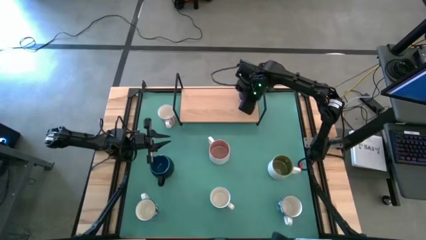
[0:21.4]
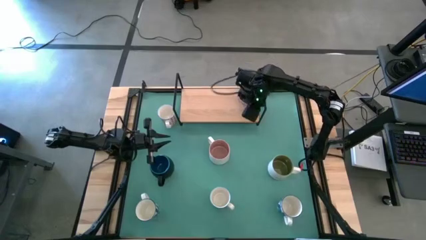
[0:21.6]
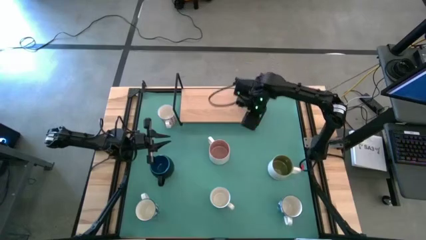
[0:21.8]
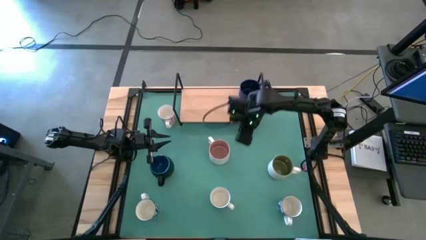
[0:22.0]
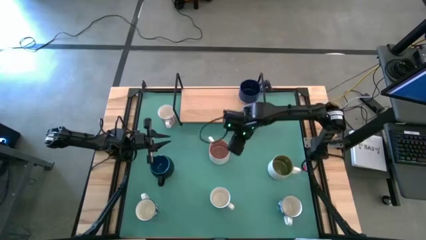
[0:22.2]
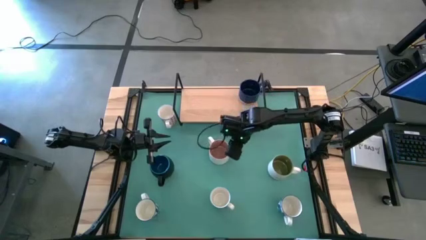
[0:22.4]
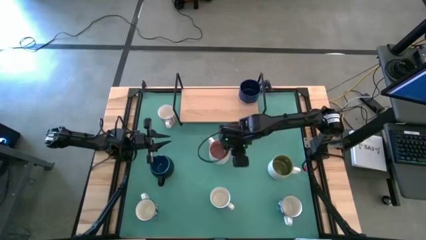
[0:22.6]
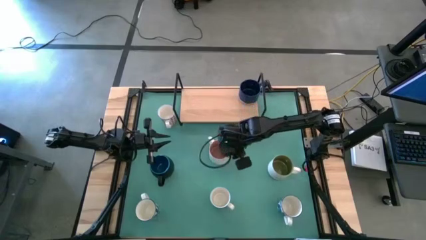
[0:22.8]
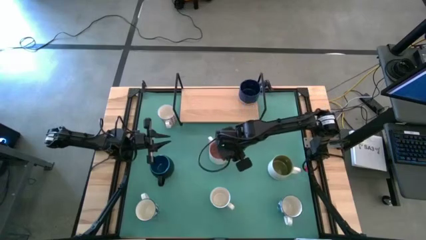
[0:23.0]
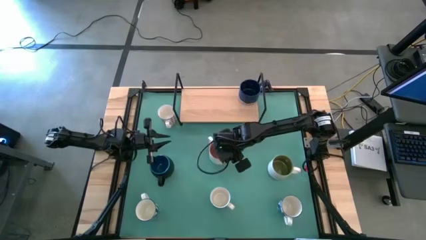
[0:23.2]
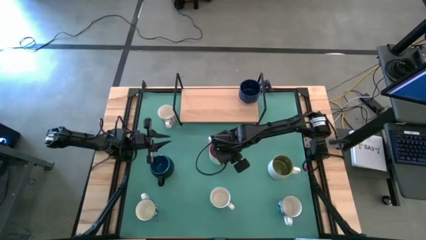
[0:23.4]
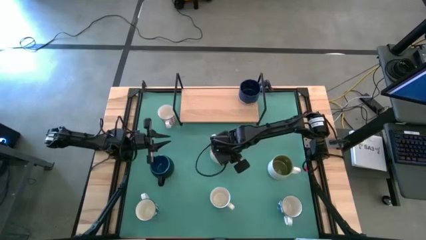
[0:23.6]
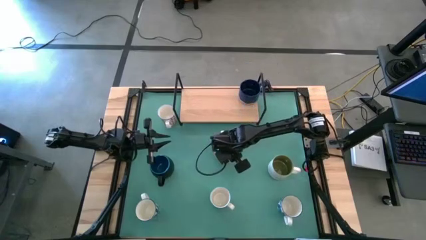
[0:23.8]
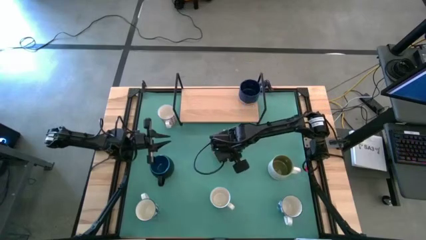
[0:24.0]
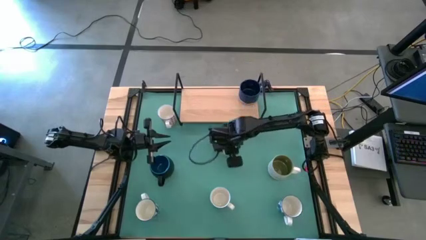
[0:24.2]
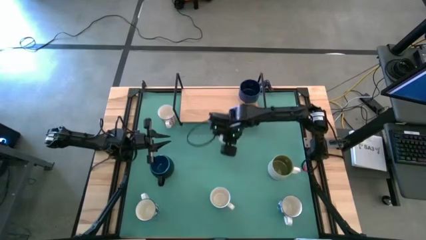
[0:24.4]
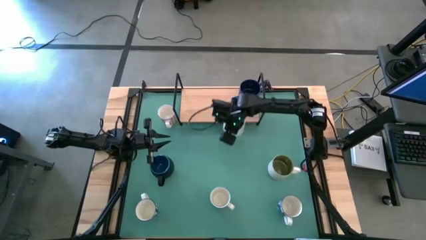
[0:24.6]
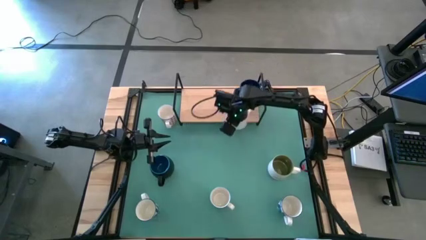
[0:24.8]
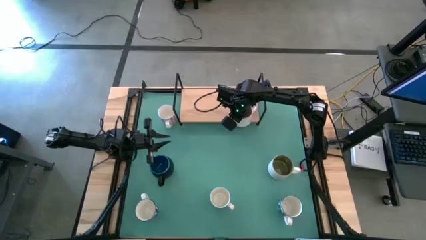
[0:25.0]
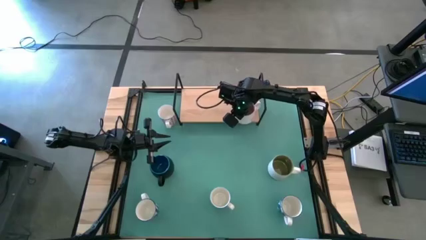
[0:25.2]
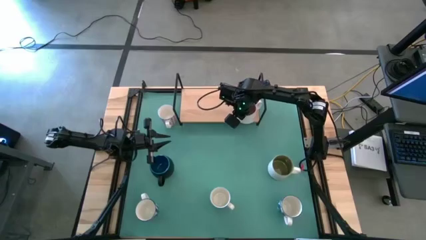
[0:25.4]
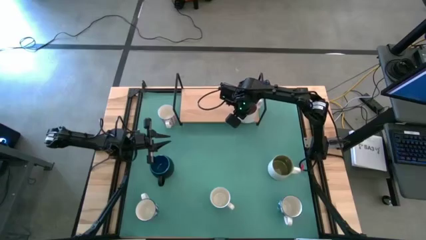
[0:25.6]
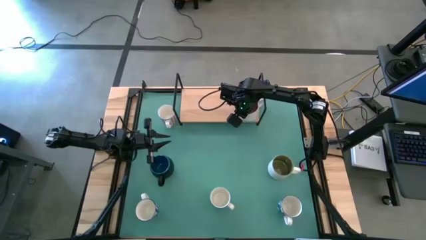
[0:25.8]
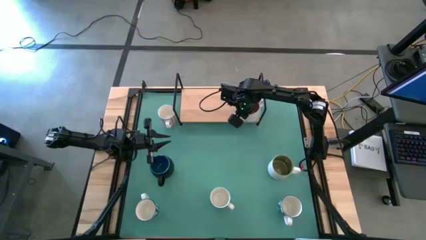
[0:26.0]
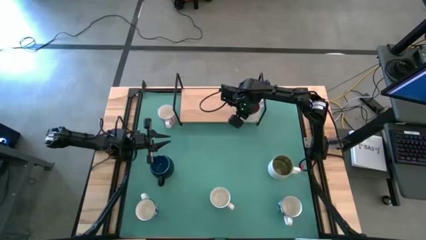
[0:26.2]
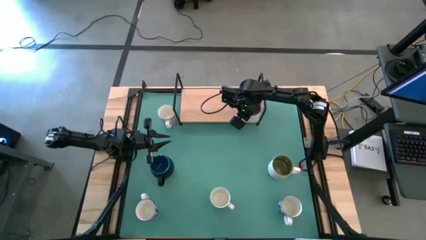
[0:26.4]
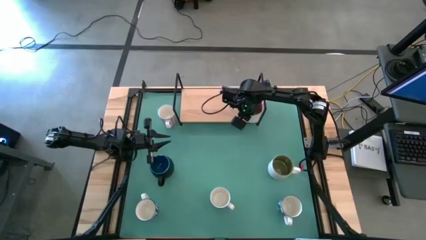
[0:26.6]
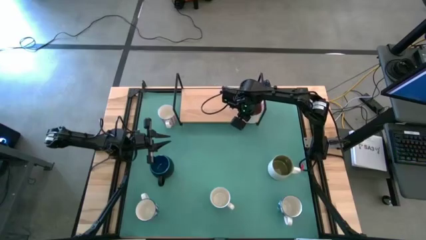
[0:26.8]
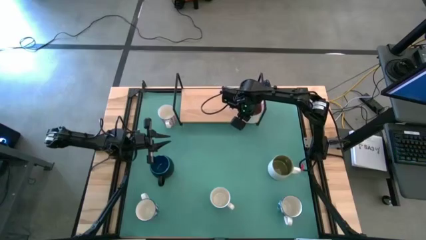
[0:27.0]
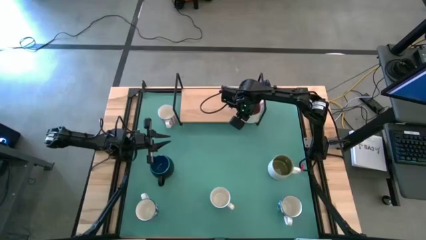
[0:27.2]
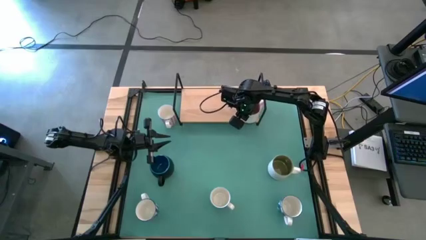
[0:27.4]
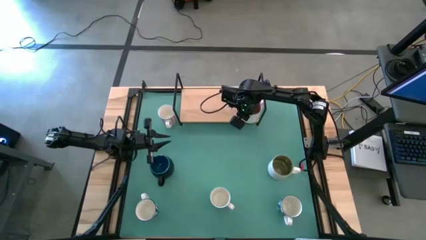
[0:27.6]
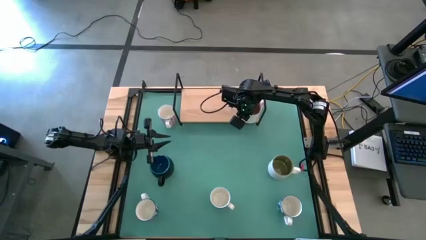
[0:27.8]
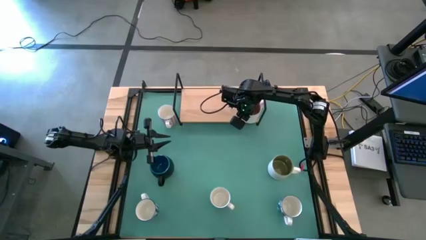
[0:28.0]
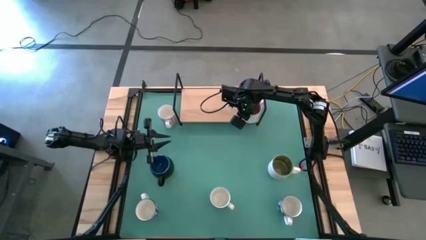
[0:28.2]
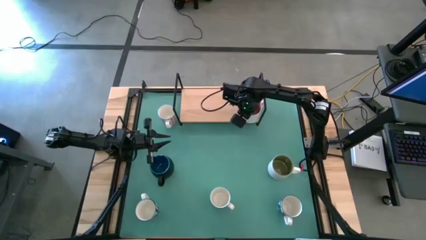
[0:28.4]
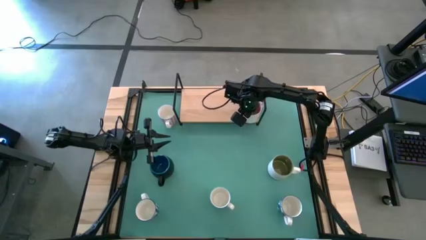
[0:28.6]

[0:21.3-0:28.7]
Task: Place coffee mugs
Put the pink mug on the shelf

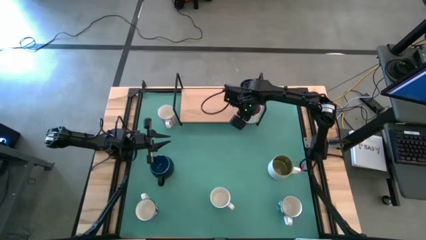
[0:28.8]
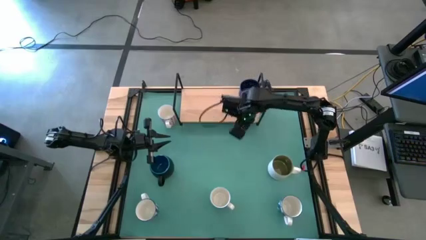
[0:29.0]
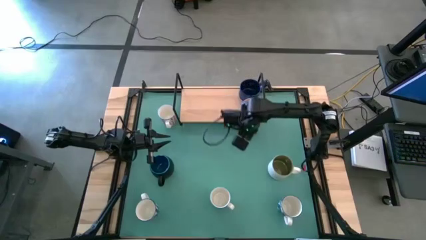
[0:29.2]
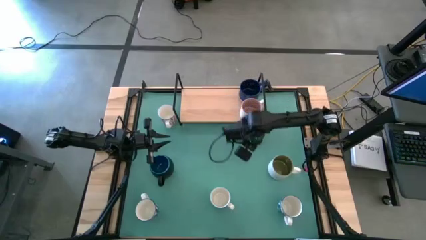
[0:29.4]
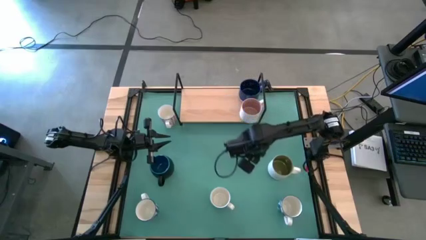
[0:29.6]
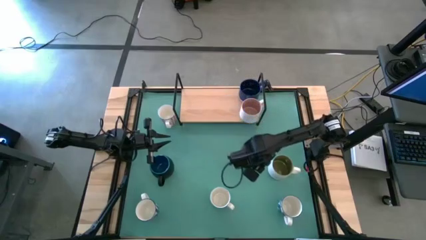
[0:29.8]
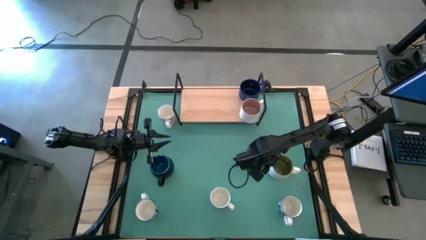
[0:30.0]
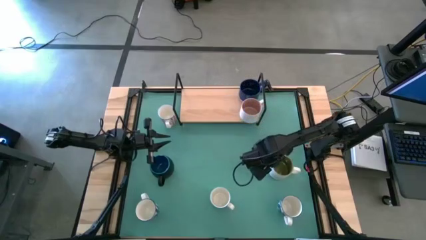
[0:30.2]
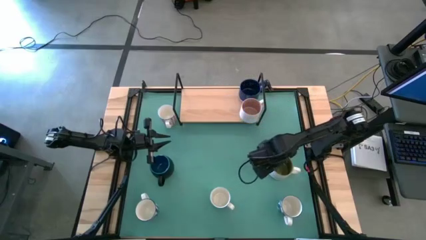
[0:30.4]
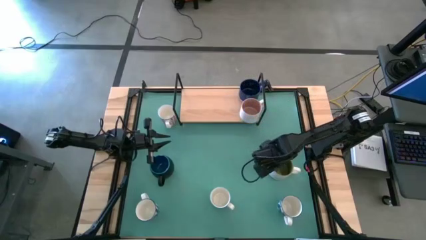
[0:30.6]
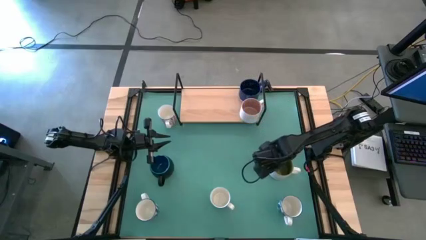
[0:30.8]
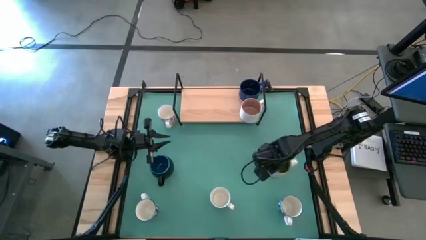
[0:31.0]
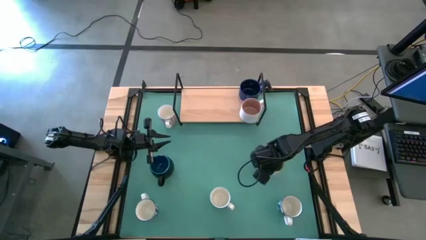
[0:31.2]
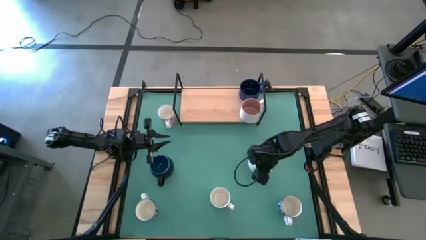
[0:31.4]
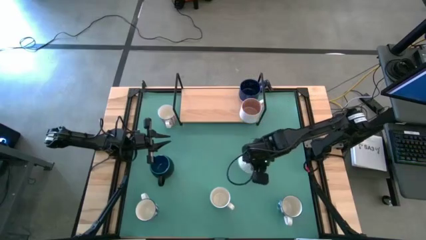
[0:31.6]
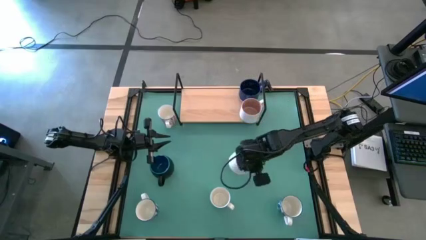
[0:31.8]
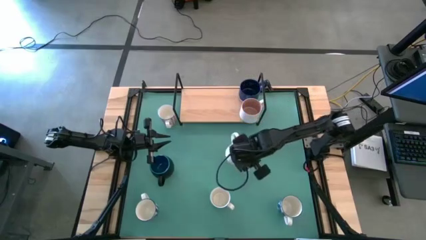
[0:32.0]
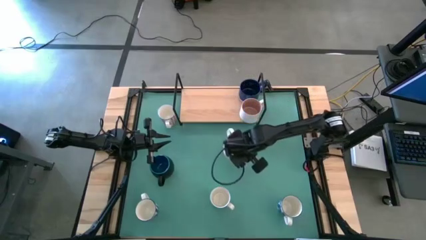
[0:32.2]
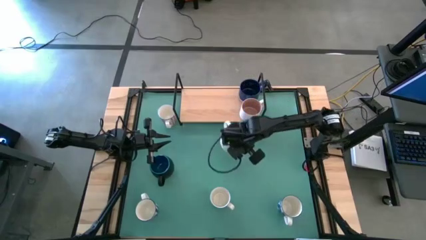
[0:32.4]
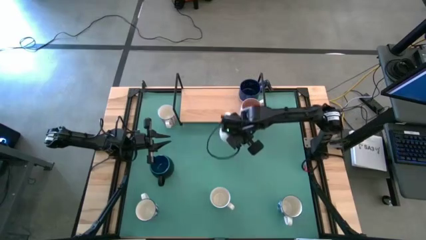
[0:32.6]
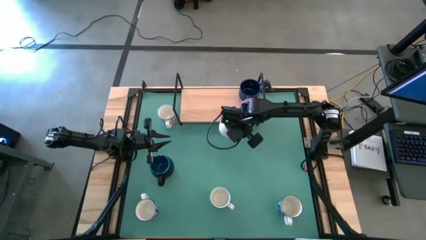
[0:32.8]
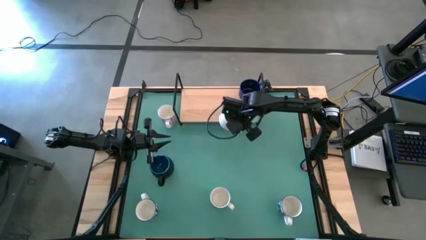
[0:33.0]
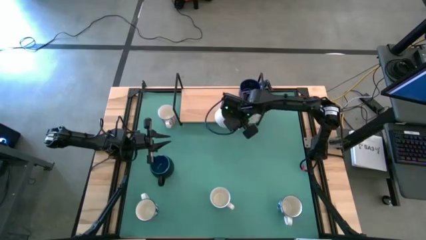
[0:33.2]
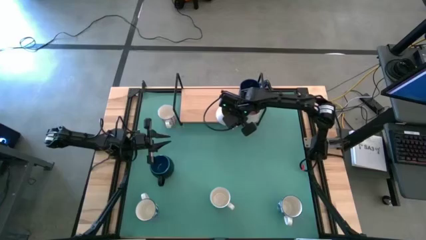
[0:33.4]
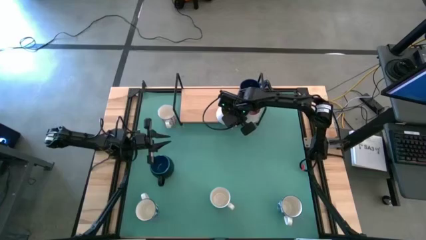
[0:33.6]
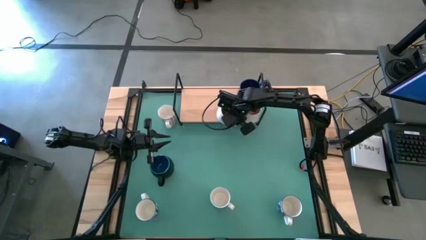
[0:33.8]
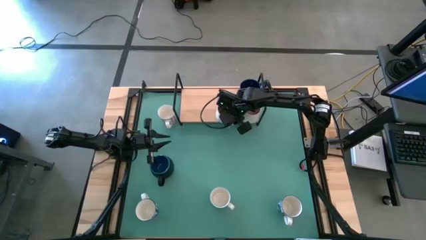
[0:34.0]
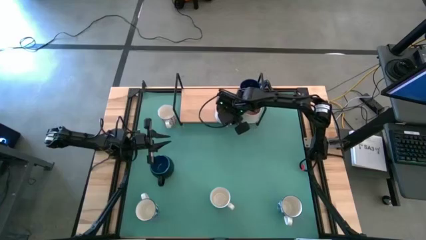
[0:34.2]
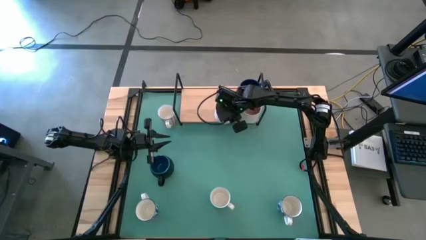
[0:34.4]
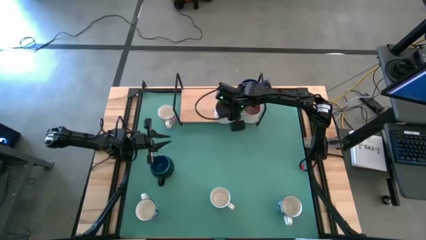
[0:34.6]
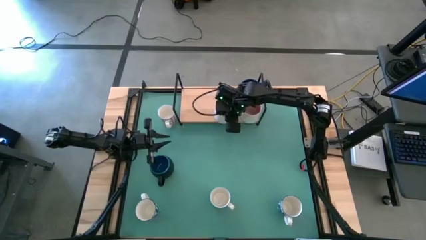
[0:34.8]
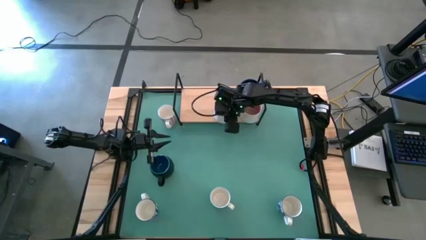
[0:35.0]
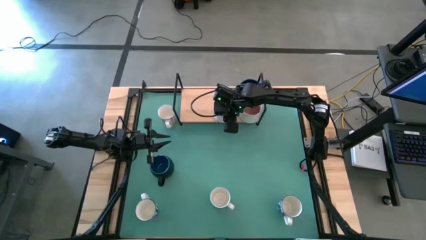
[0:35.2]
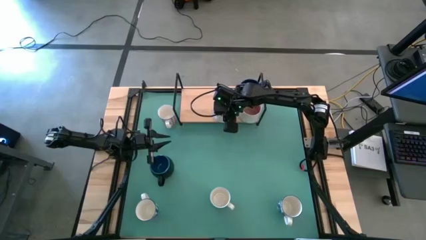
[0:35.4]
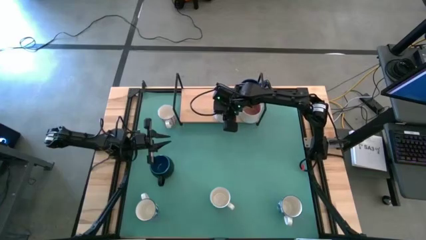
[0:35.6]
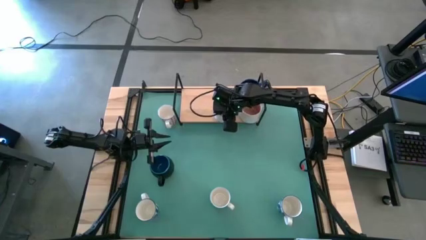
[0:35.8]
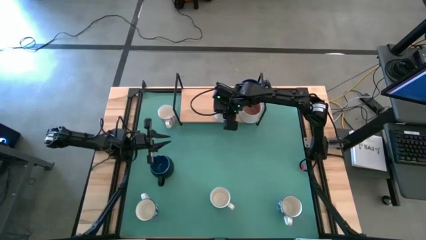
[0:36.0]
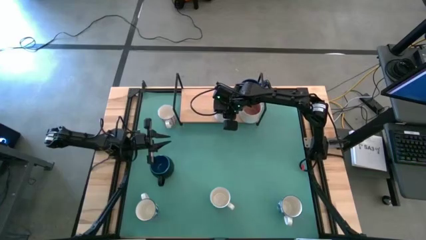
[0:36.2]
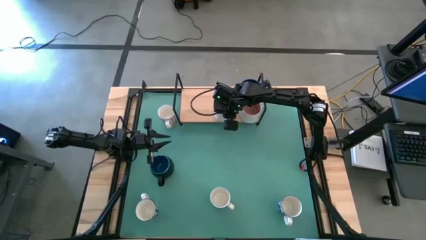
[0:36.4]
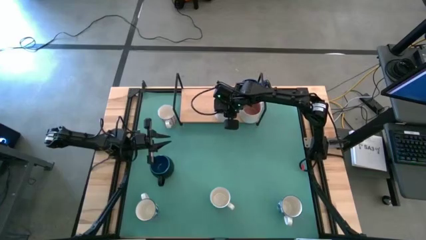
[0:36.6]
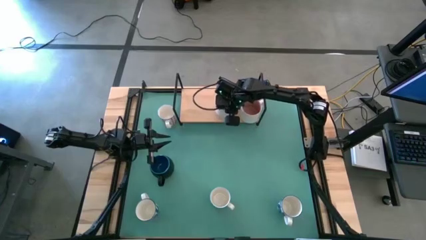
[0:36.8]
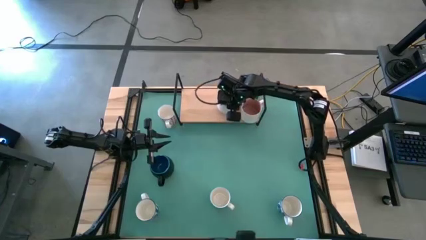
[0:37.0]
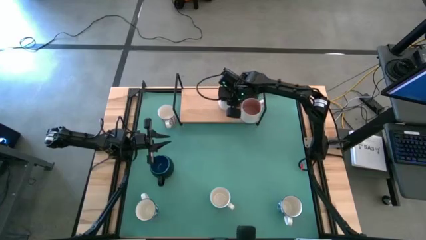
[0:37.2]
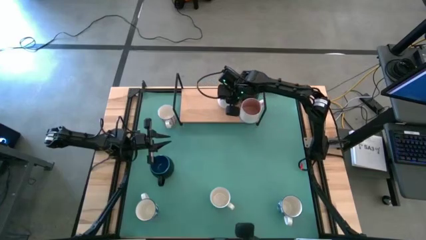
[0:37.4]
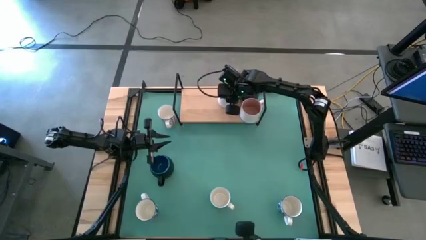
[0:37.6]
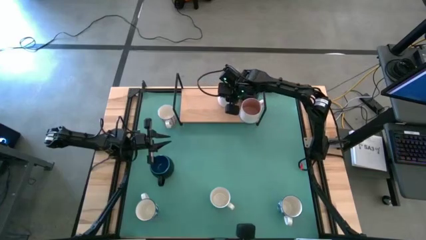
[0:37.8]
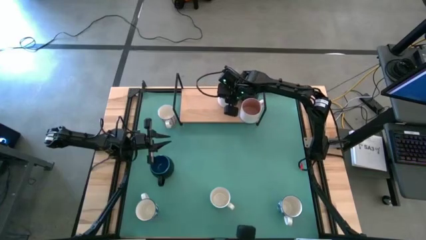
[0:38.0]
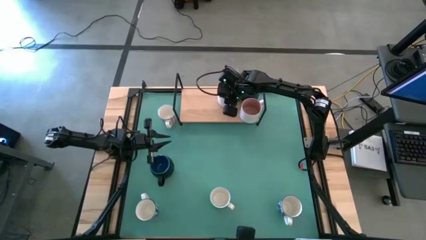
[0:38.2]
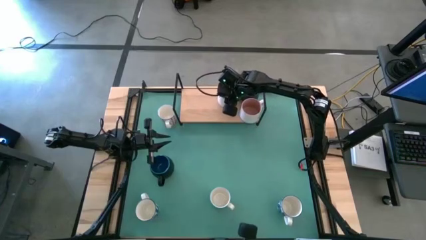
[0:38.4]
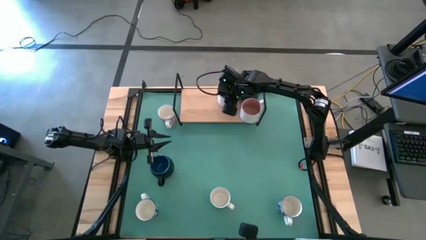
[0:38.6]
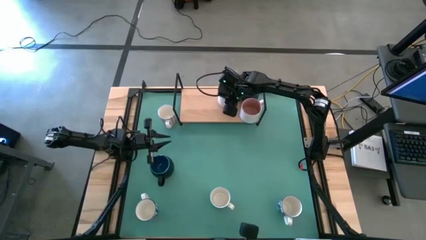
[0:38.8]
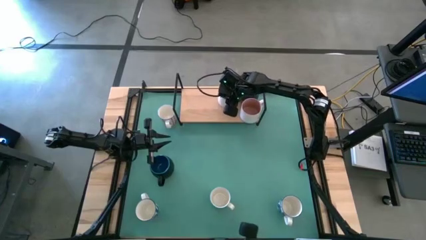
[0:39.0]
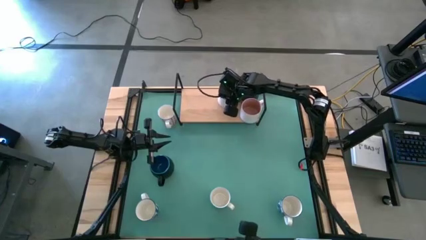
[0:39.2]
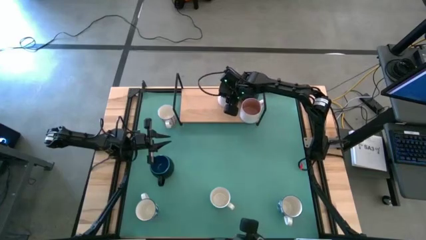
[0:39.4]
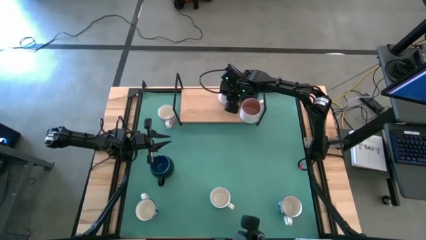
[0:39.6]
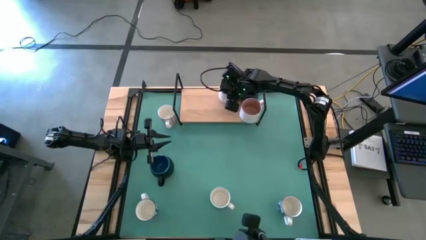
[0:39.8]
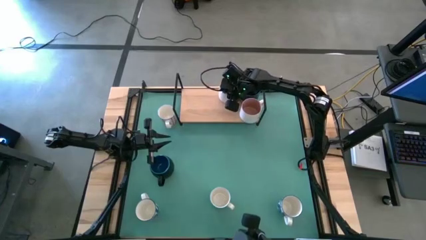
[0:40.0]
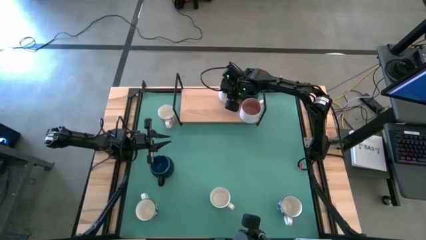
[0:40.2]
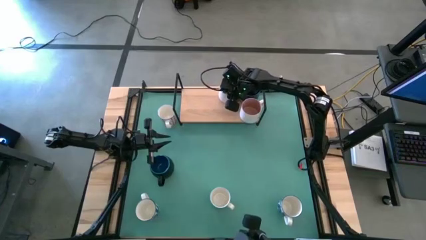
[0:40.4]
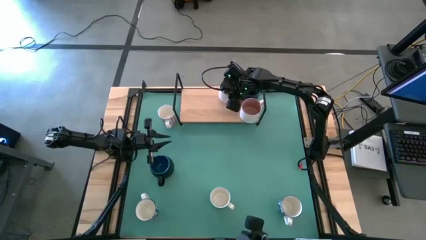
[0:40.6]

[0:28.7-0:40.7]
Put the green mug on the shelf
